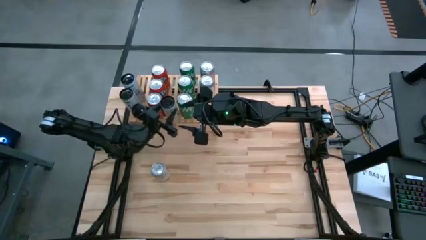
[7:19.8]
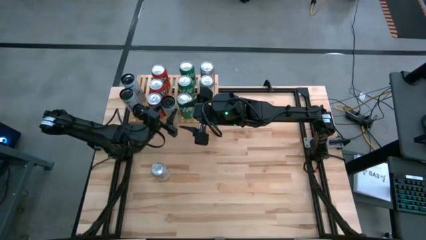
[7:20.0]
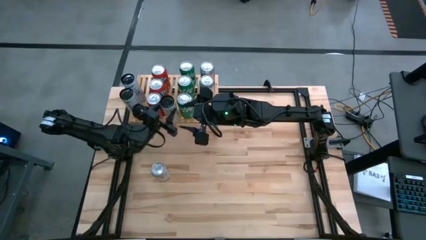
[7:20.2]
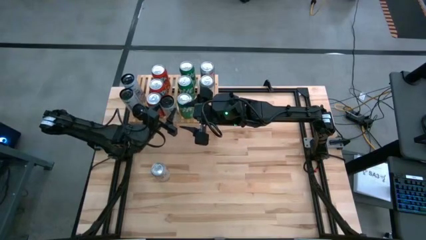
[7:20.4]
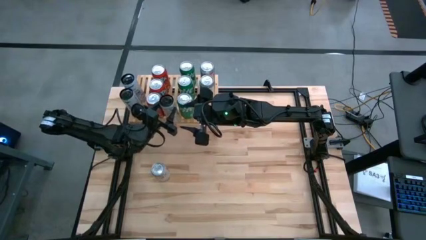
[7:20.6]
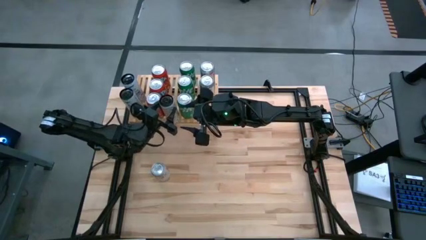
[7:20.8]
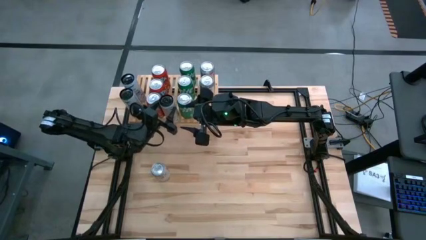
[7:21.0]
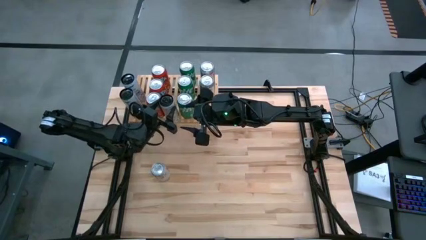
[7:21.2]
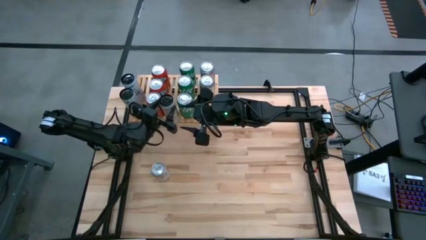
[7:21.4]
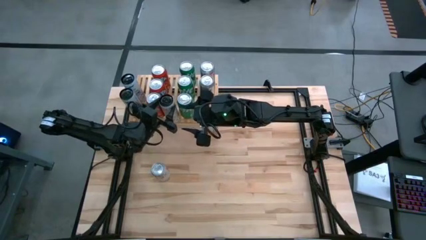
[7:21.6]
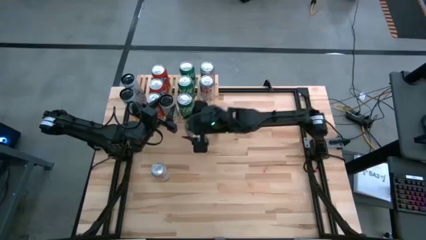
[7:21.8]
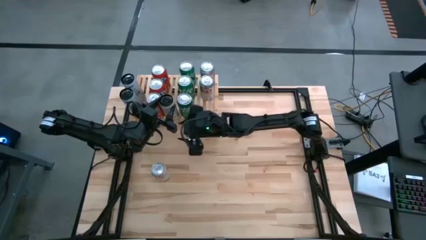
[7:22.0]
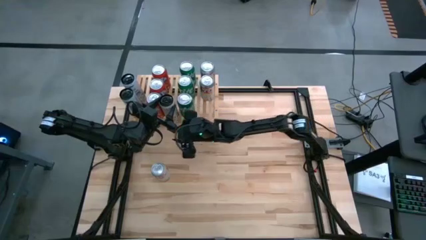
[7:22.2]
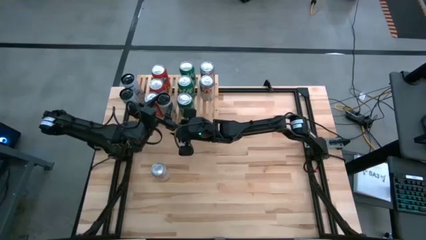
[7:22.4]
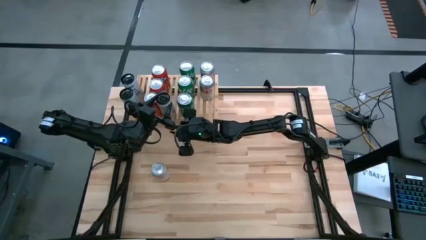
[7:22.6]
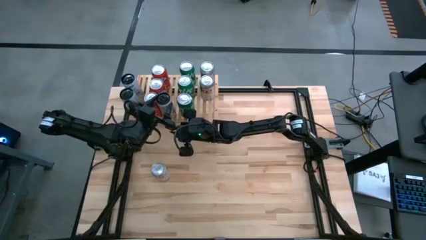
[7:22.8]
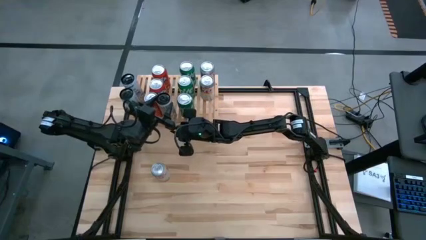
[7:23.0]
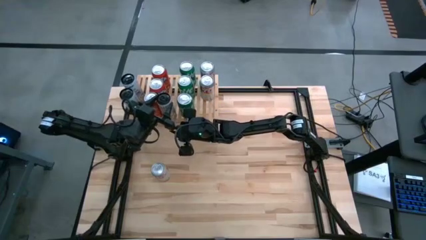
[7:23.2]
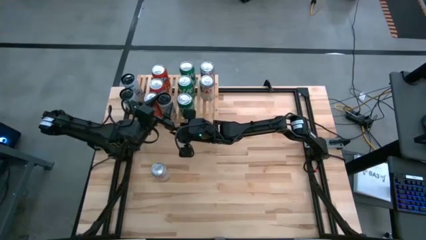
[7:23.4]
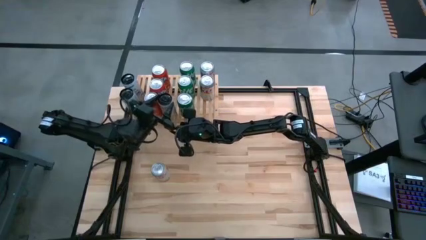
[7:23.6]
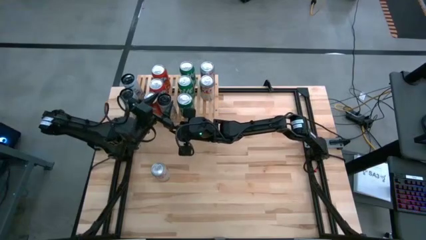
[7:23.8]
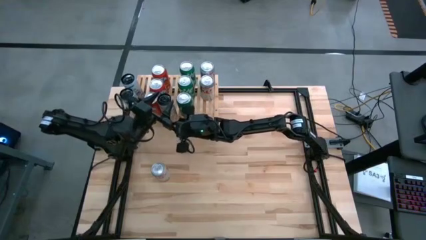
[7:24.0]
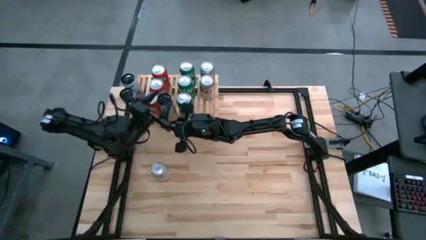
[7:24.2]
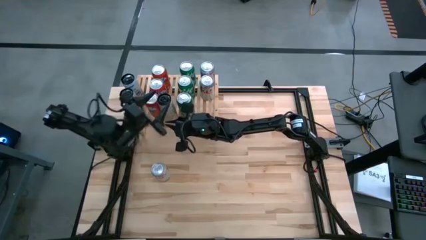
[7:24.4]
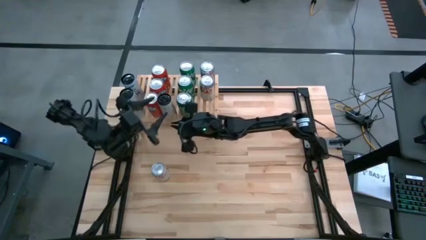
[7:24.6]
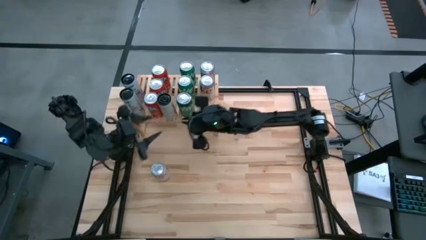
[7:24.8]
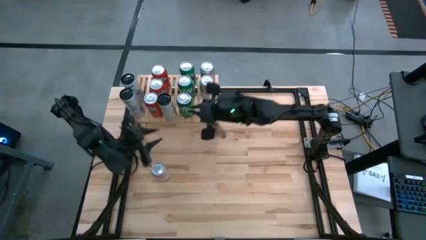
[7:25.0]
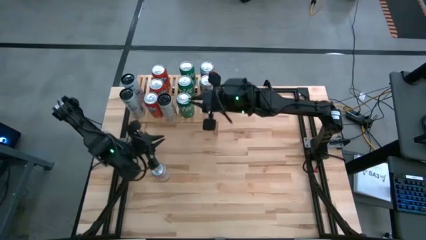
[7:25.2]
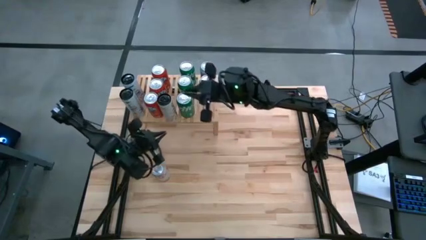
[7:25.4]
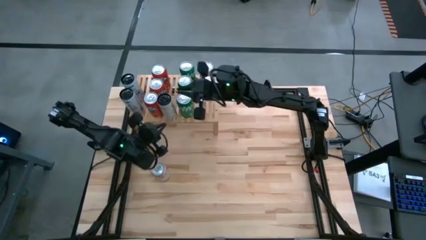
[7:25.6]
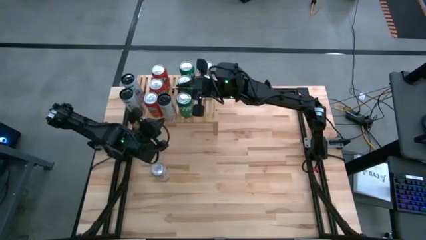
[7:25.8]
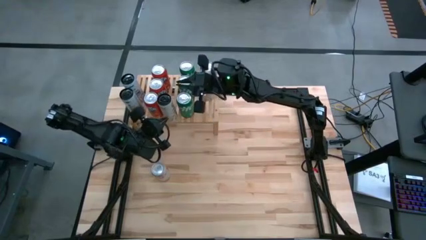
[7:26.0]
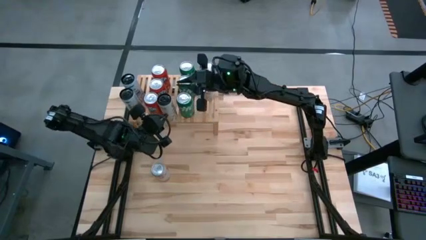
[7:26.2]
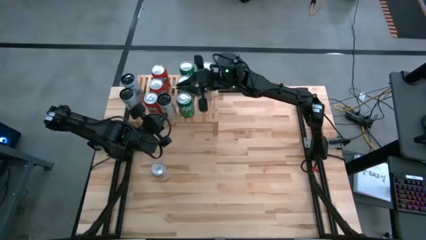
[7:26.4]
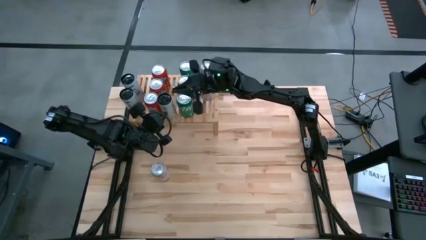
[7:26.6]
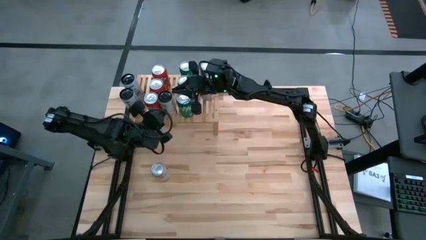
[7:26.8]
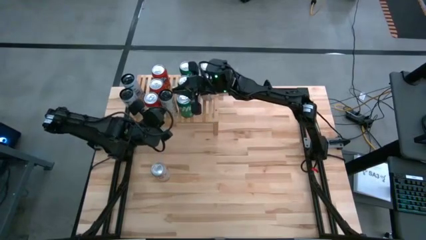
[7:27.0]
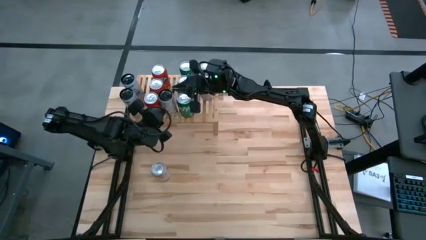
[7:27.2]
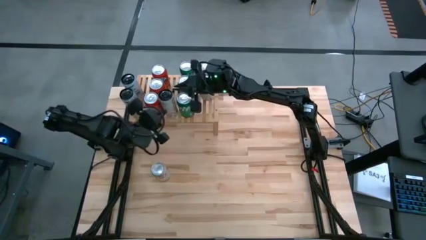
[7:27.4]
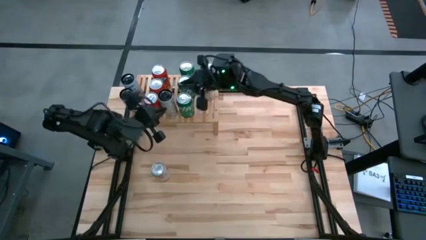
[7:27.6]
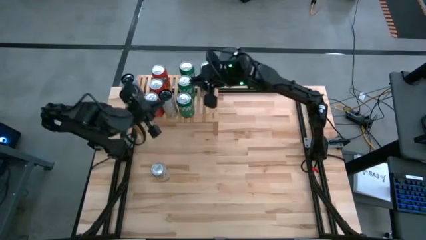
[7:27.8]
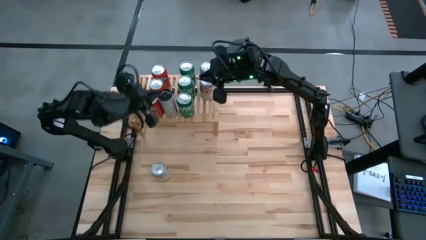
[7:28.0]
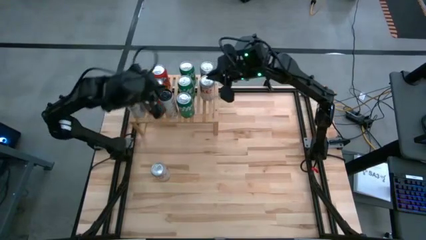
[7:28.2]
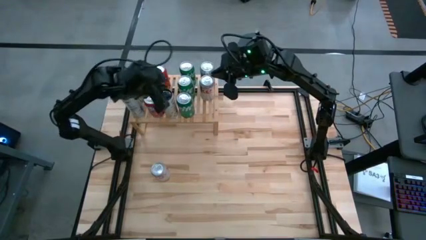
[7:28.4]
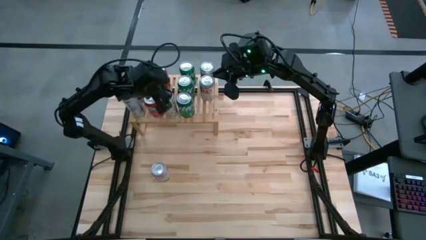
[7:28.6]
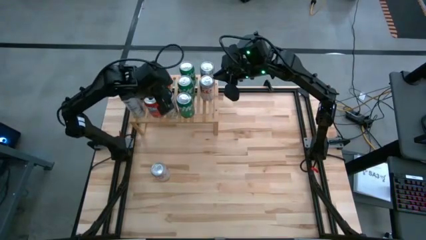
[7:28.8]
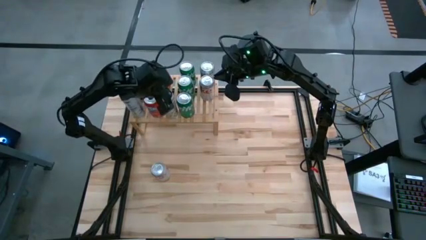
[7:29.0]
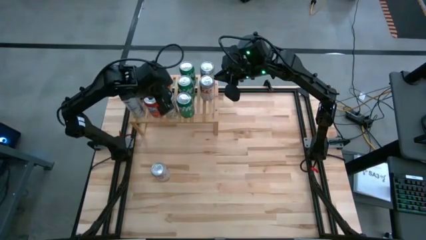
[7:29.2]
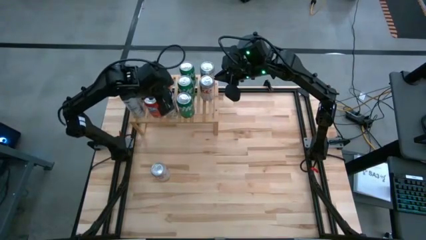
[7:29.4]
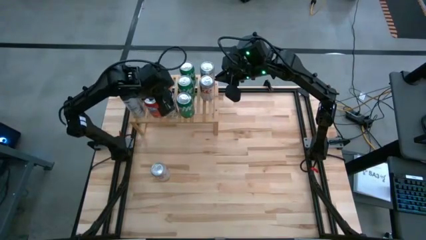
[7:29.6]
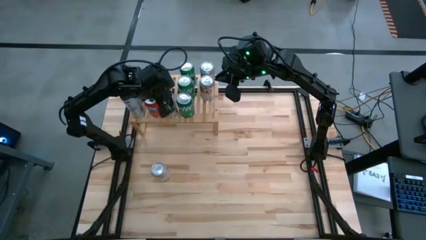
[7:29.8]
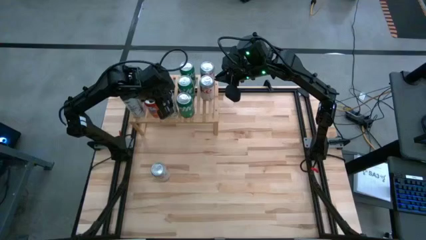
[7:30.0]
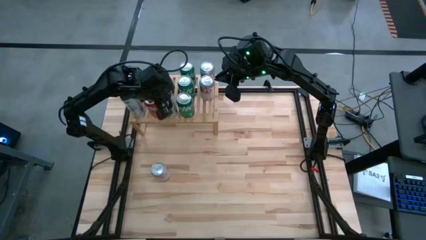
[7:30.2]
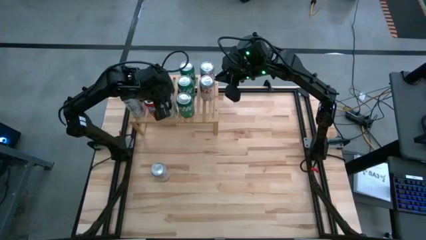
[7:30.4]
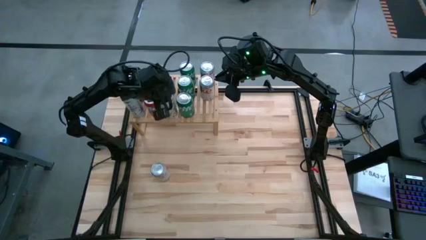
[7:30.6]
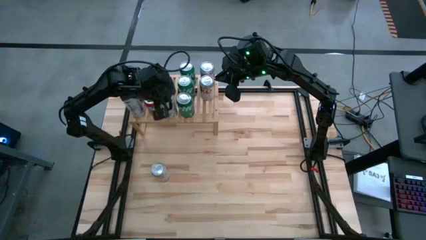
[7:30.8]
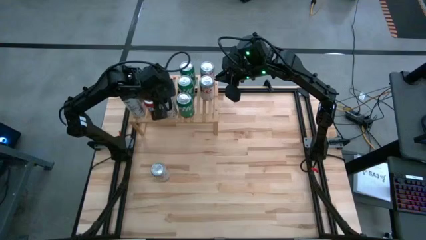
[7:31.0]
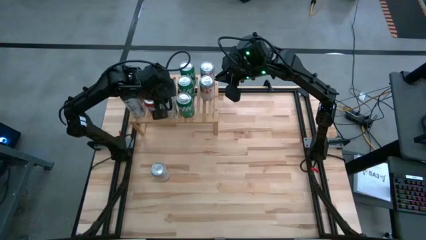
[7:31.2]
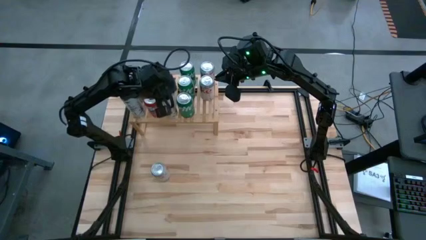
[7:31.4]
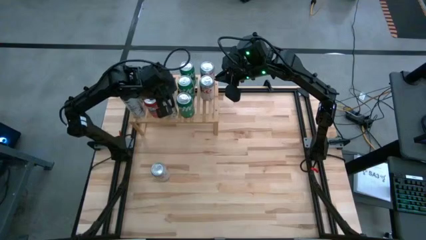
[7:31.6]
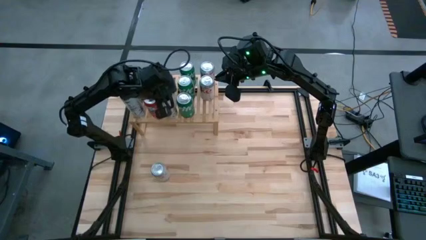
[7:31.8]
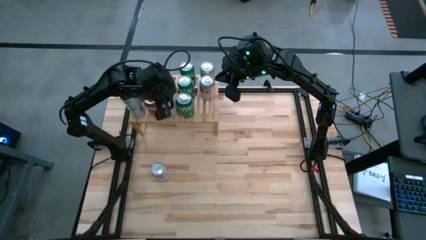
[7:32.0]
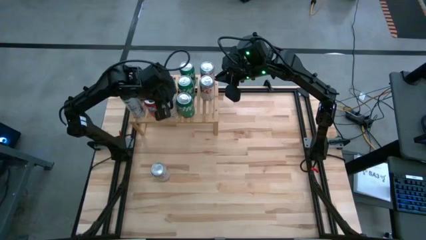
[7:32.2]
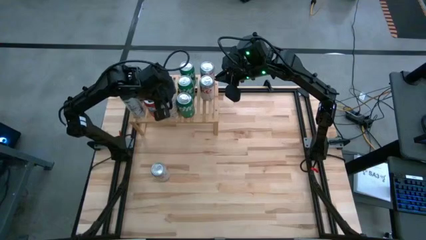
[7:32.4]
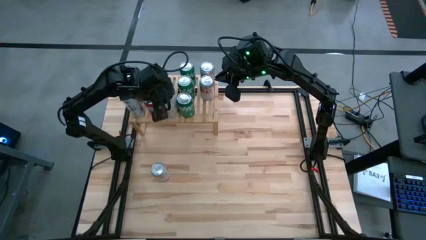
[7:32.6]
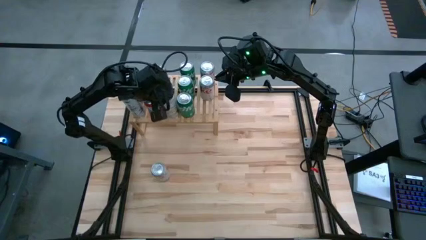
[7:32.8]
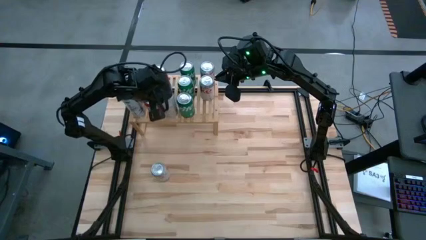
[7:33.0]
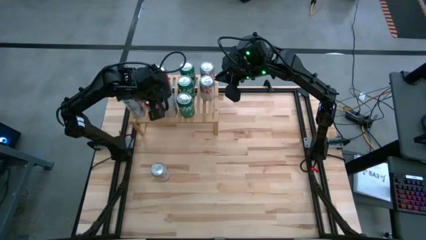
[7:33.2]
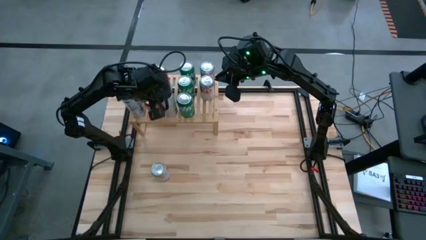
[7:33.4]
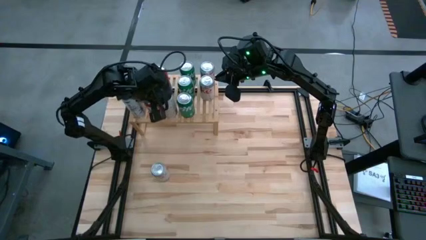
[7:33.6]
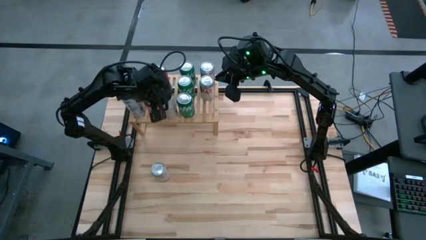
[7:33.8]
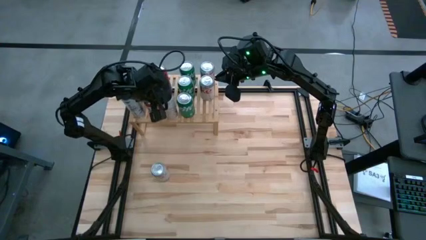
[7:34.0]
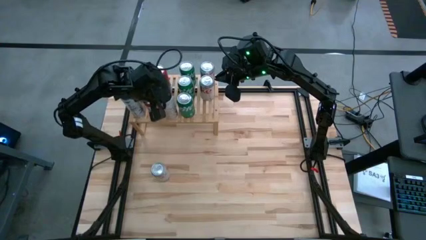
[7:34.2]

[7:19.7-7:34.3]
Task: Place canned beverage on shelf
Put the white and yellow soda can on the shelf aligned with the other white and yellow soda can
